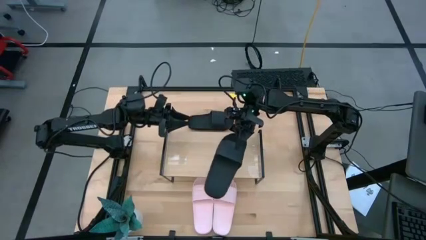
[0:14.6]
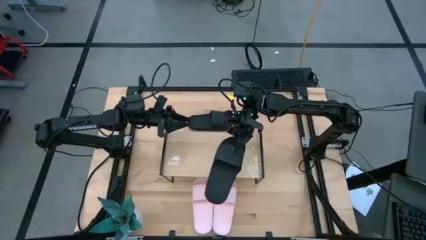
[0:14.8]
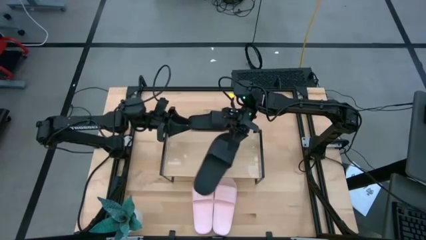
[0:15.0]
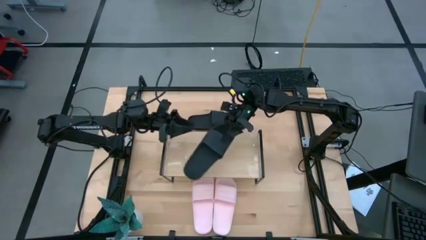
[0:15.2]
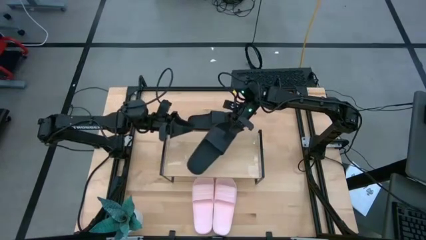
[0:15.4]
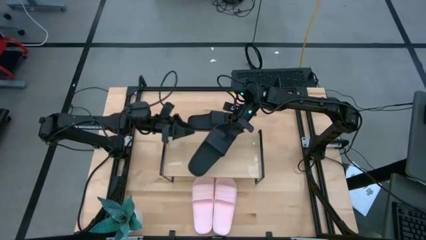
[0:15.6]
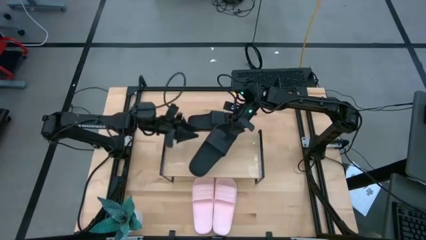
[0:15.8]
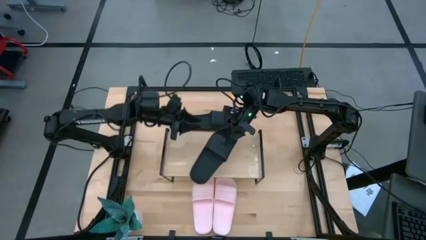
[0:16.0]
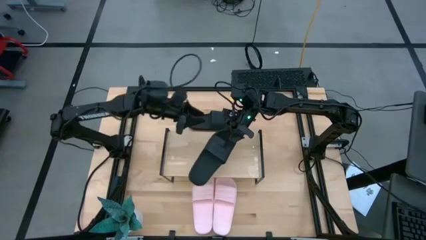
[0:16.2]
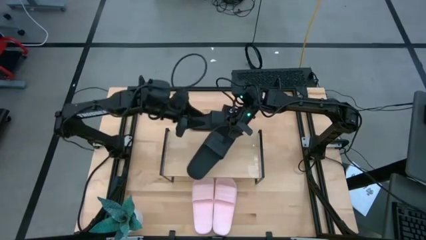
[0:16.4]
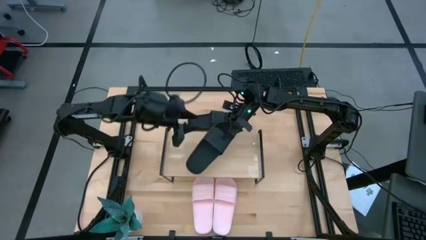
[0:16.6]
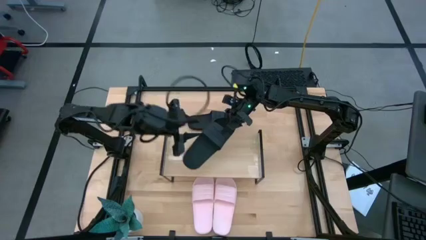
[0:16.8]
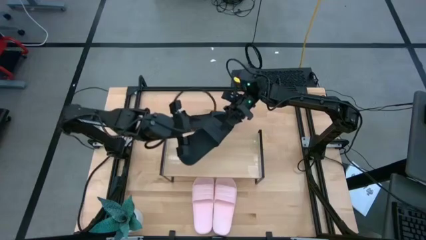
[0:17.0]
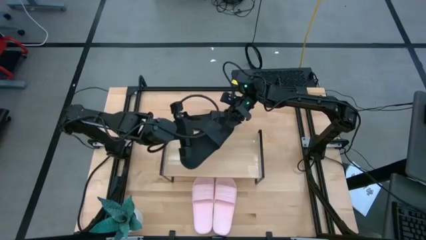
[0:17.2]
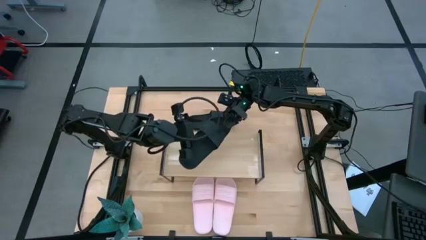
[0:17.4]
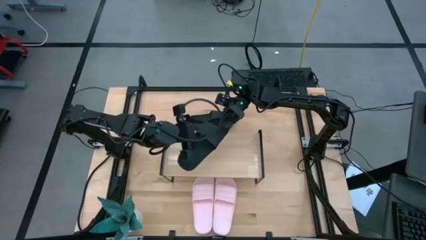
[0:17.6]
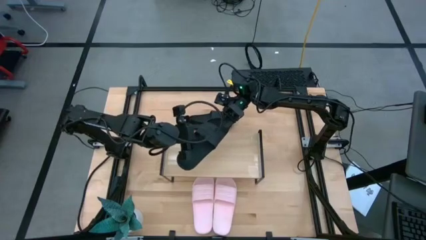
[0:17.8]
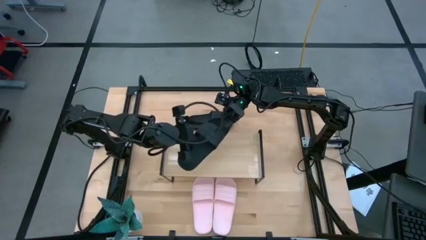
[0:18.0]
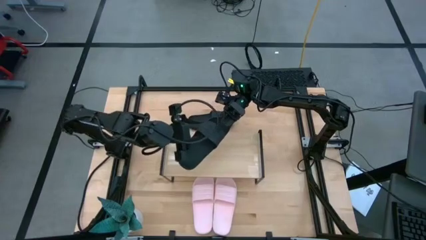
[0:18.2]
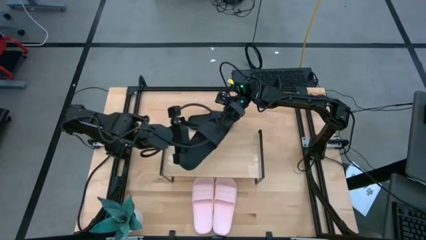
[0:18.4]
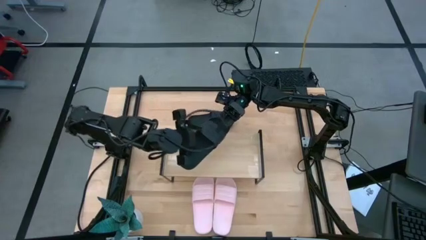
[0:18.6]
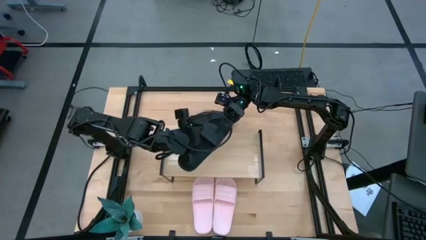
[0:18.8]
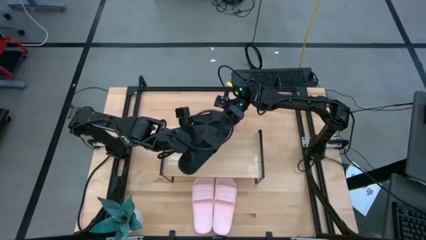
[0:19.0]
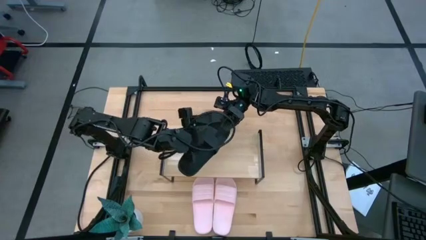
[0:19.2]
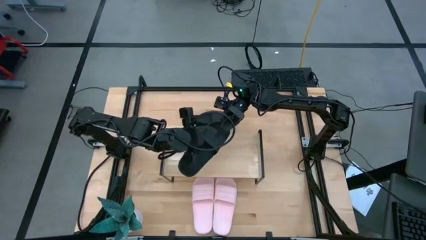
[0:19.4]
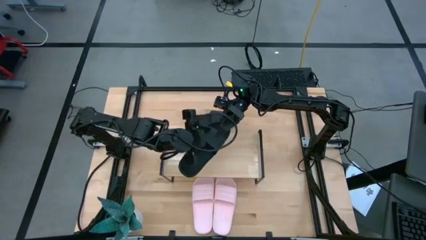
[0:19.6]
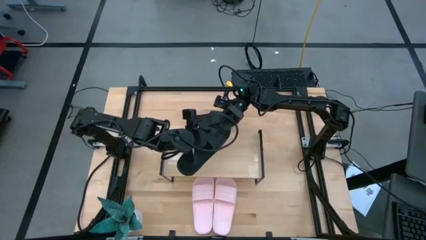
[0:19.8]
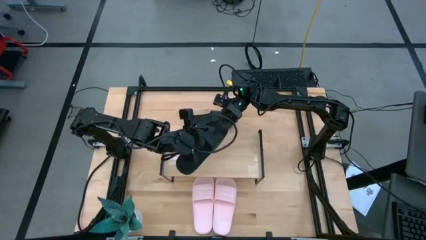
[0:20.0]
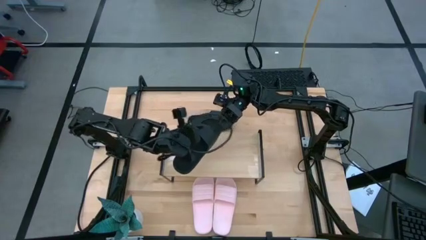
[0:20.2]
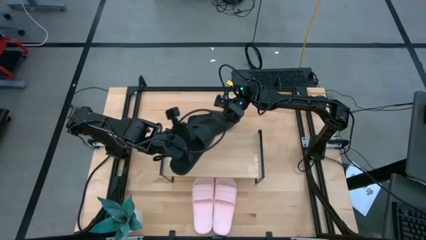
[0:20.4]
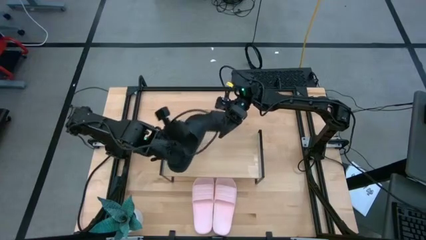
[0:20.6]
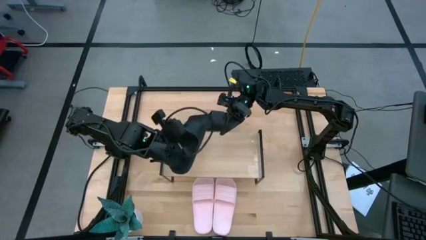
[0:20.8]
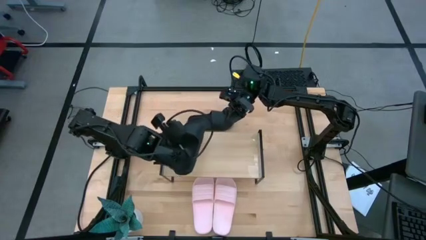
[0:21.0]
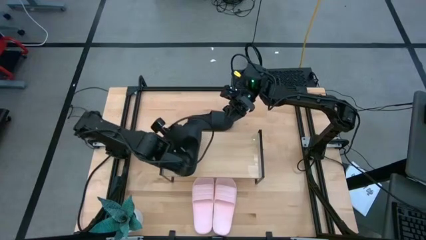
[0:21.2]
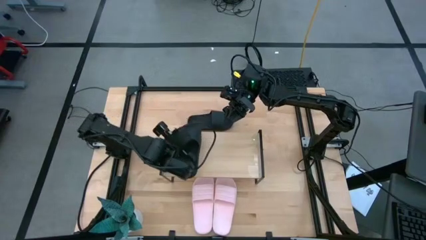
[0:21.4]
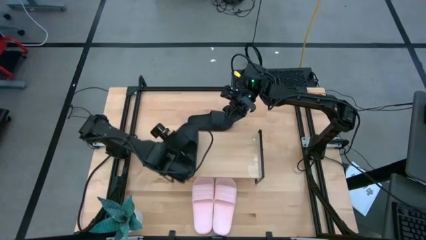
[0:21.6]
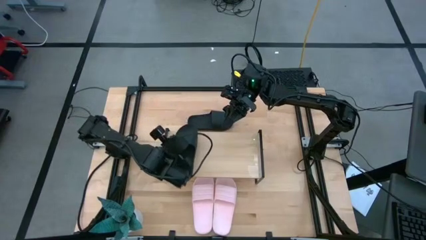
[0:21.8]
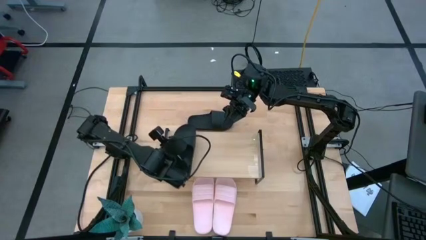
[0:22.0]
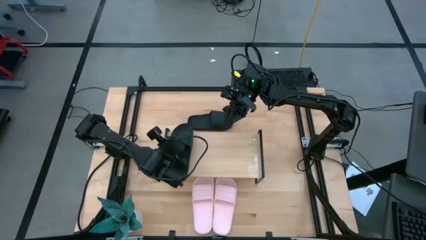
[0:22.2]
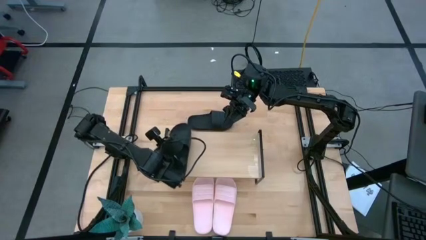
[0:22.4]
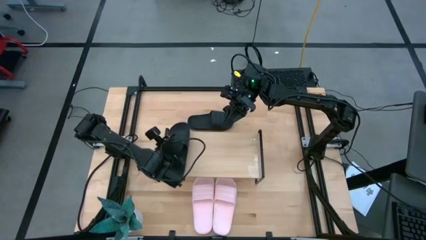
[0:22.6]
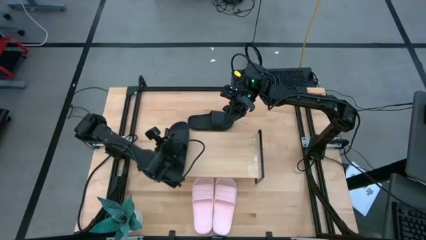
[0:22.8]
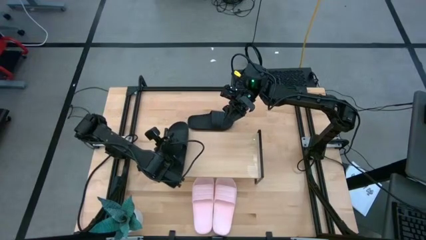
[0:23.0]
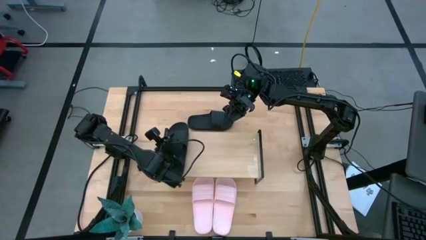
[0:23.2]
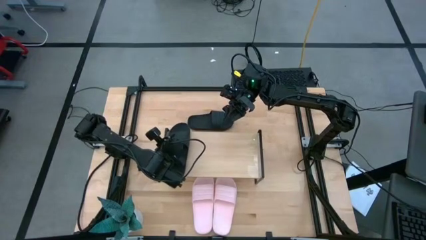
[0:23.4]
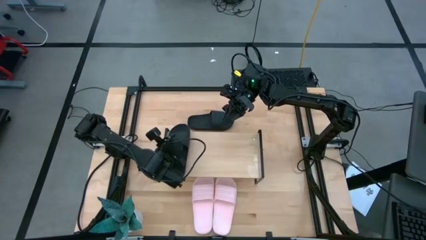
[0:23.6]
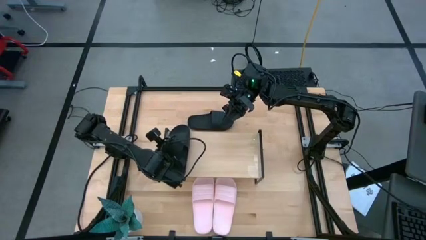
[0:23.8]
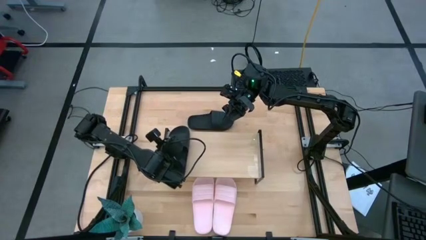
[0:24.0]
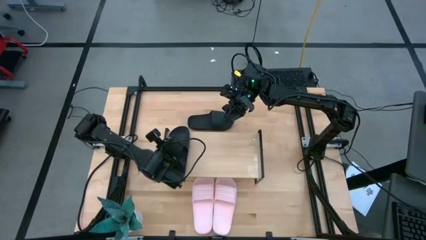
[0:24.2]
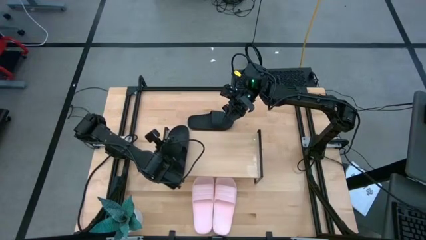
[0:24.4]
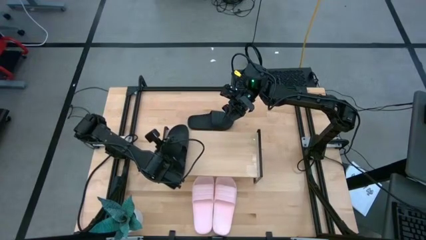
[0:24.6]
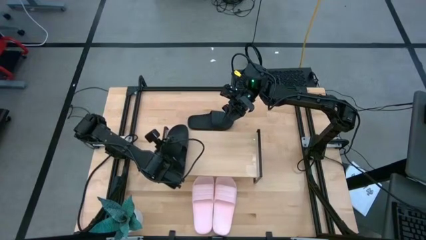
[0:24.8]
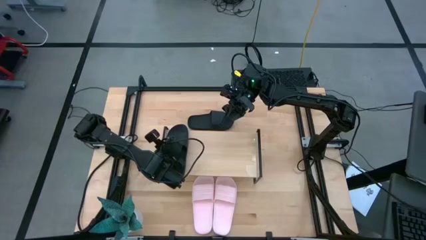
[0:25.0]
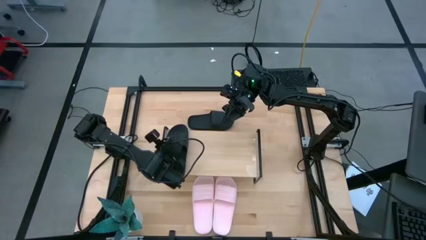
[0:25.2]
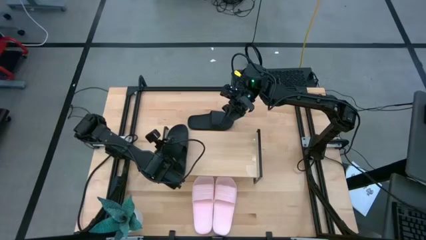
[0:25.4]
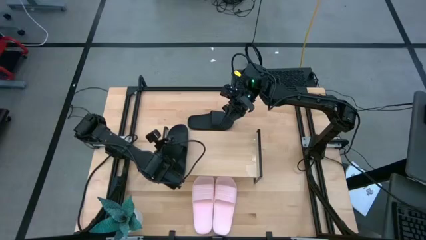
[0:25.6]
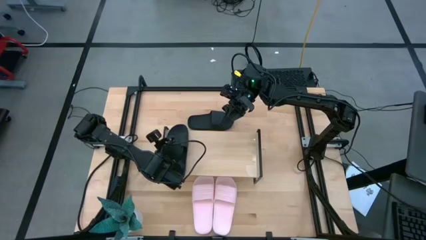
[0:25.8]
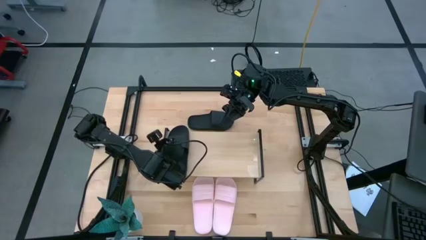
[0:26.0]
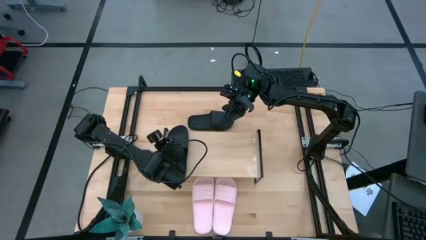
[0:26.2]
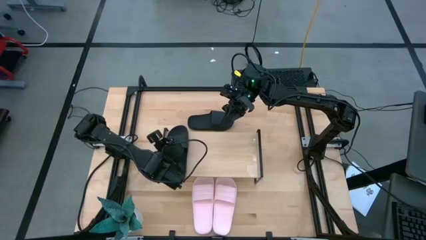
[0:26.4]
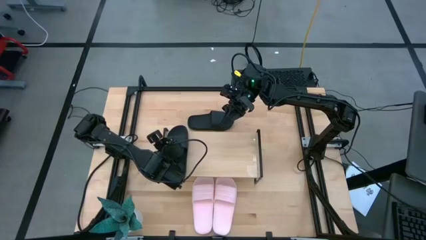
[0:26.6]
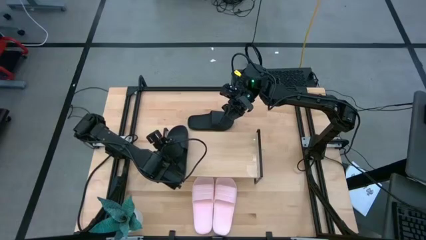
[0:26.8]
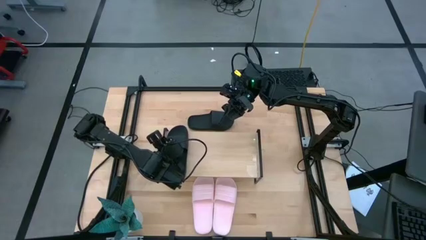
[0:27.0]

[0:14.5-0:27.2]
Task: Pick and place slides into the shelf
Put the top black slide on the shelf
